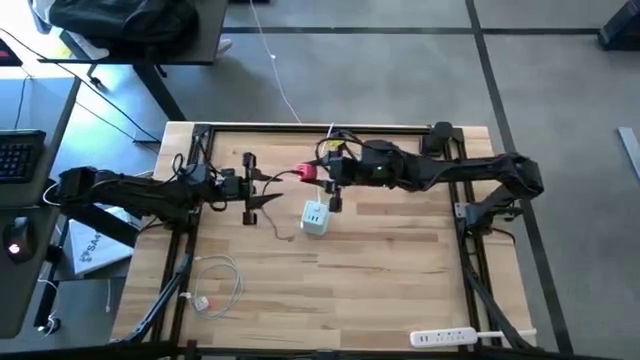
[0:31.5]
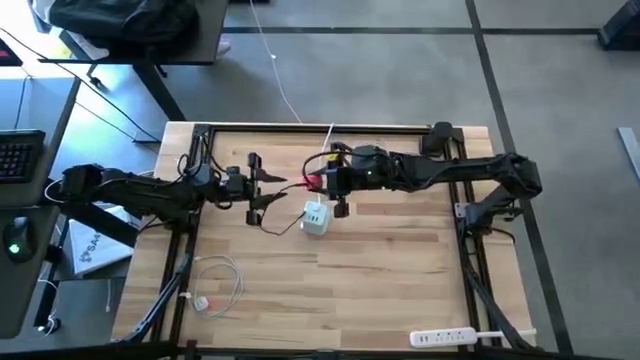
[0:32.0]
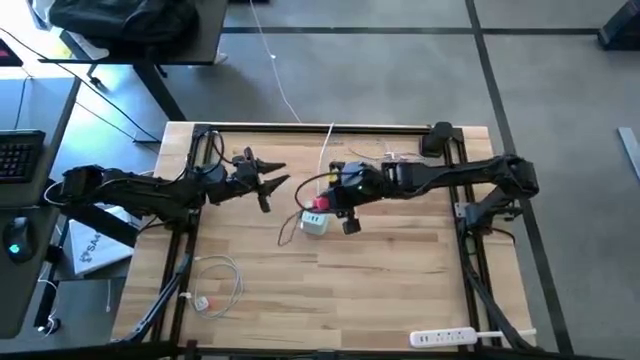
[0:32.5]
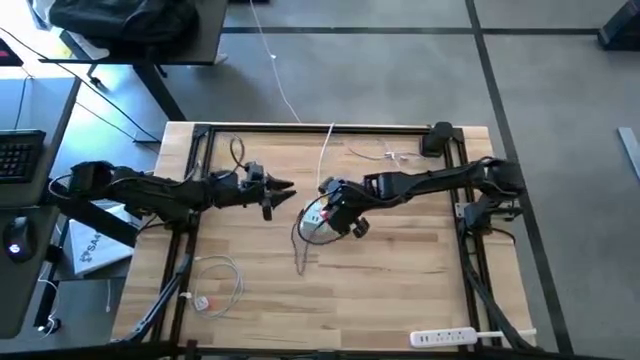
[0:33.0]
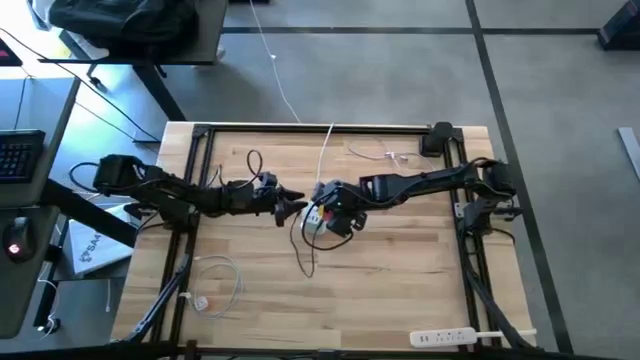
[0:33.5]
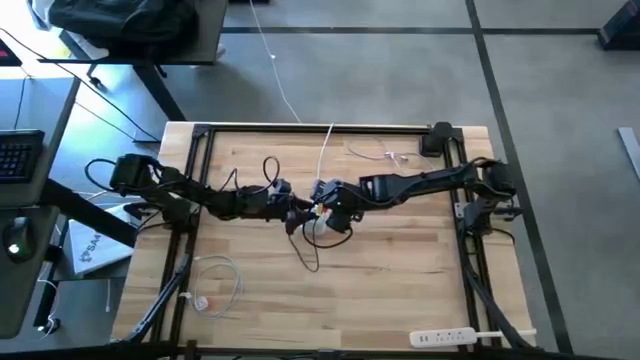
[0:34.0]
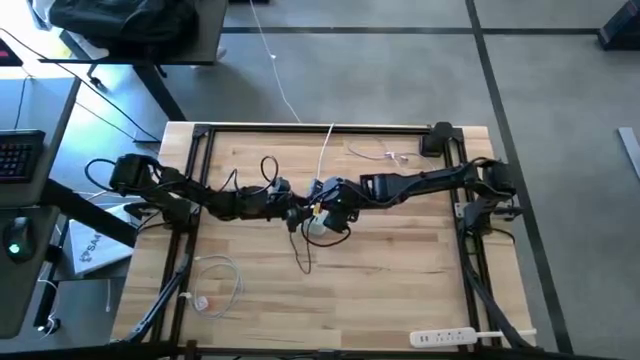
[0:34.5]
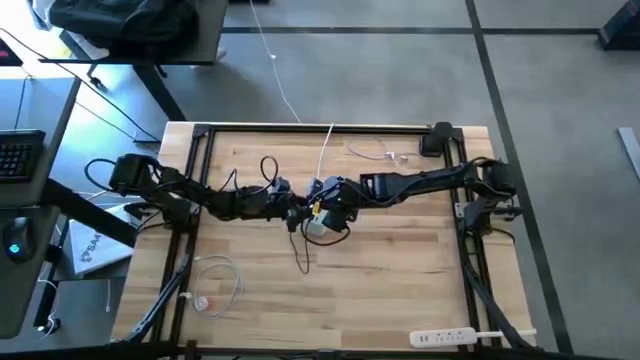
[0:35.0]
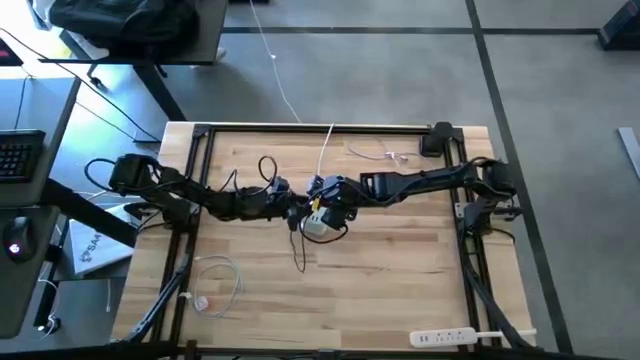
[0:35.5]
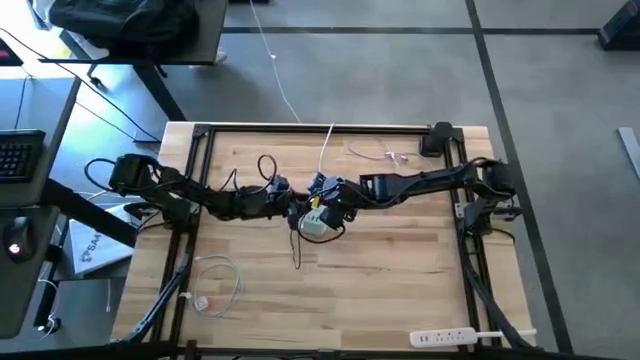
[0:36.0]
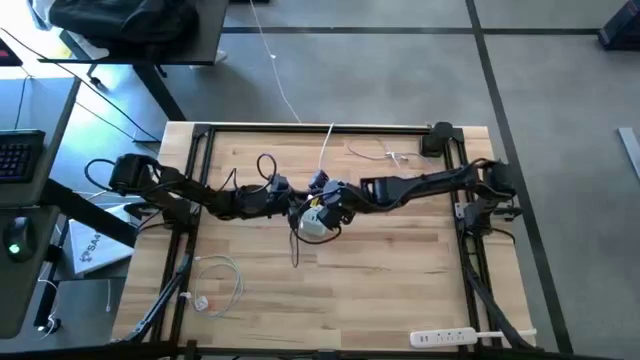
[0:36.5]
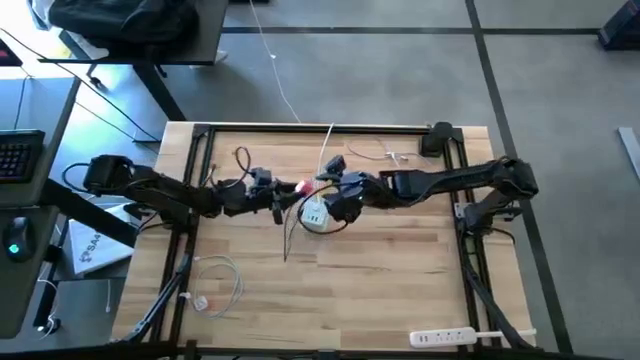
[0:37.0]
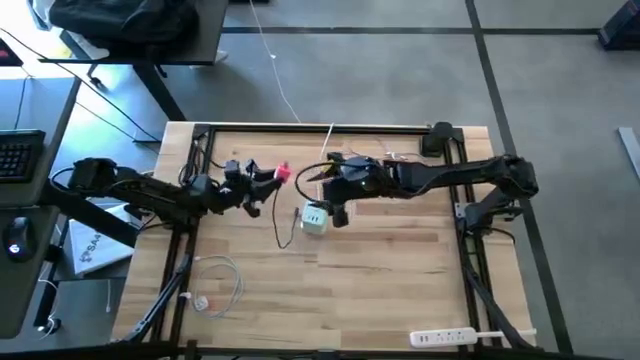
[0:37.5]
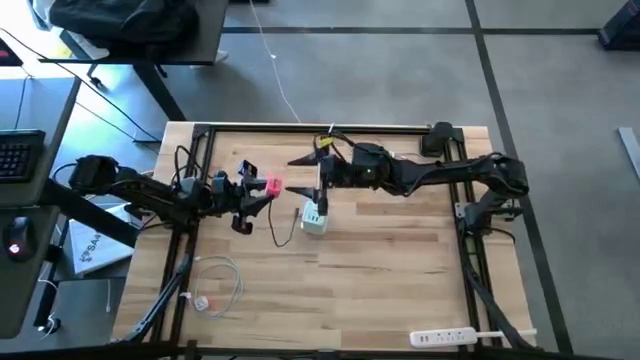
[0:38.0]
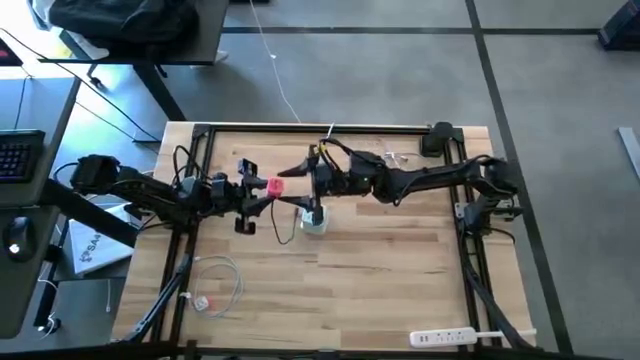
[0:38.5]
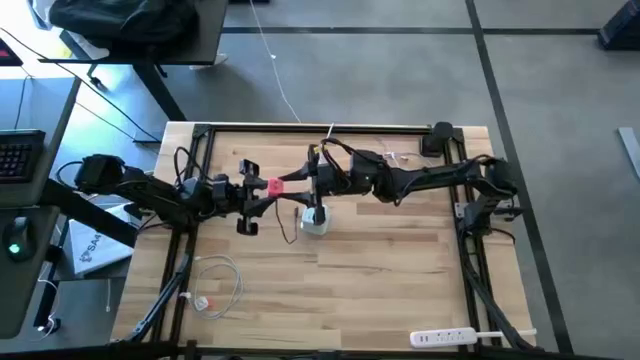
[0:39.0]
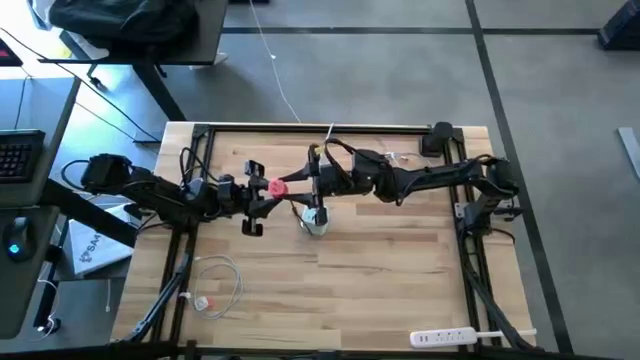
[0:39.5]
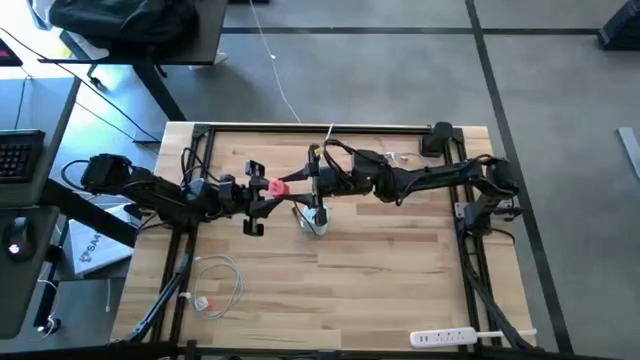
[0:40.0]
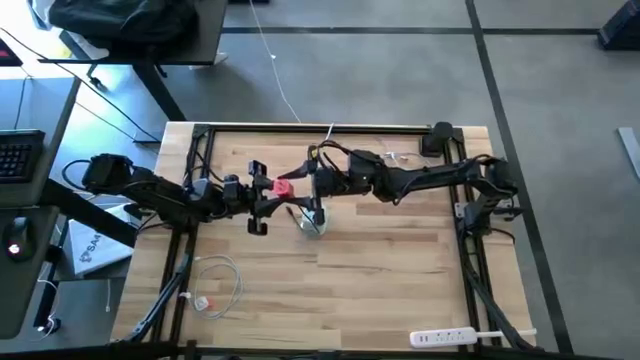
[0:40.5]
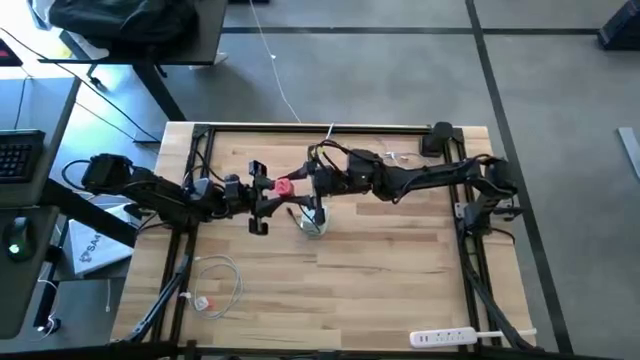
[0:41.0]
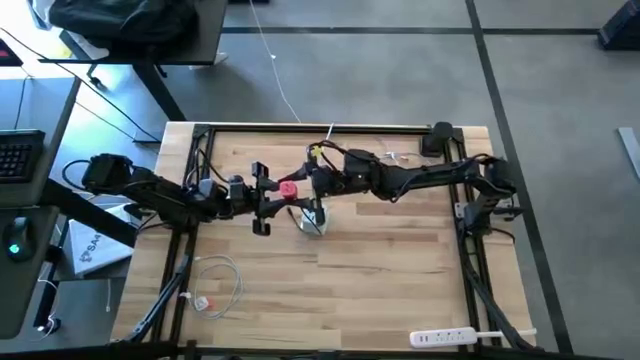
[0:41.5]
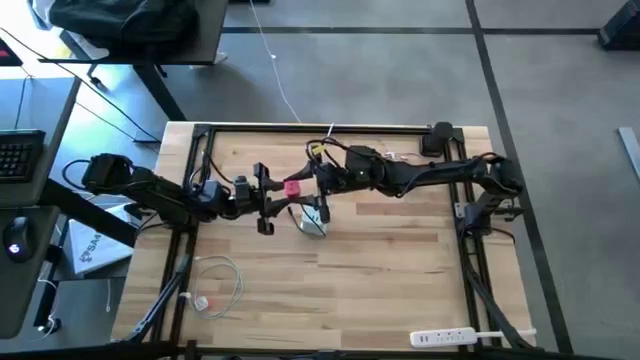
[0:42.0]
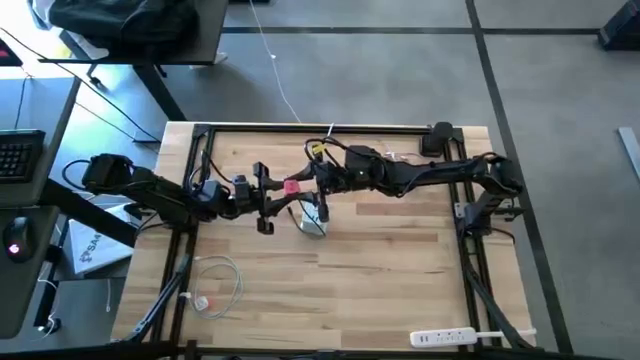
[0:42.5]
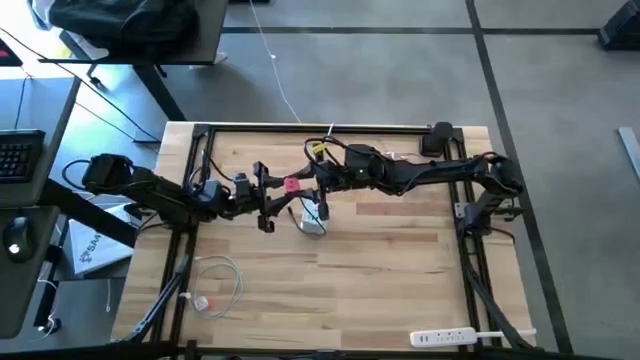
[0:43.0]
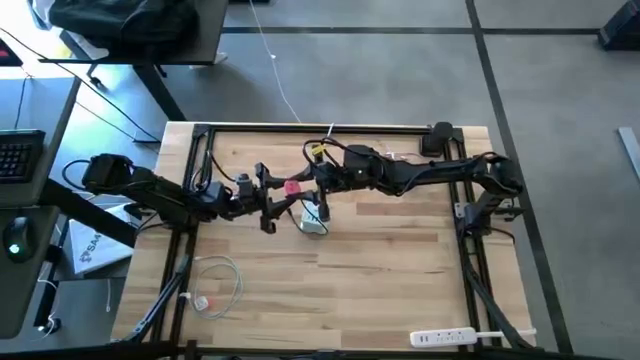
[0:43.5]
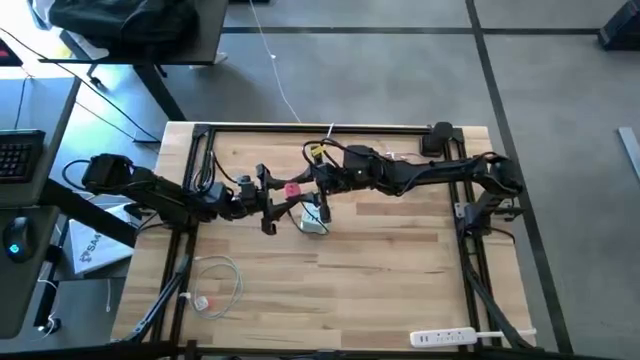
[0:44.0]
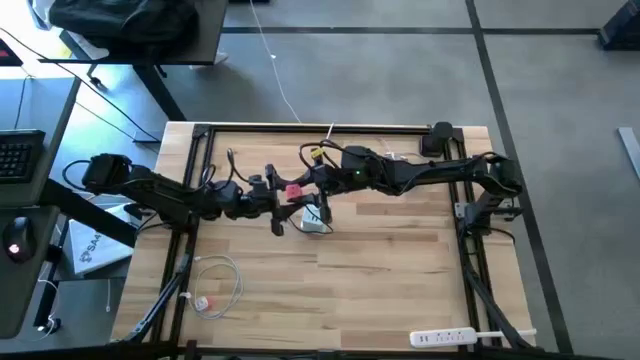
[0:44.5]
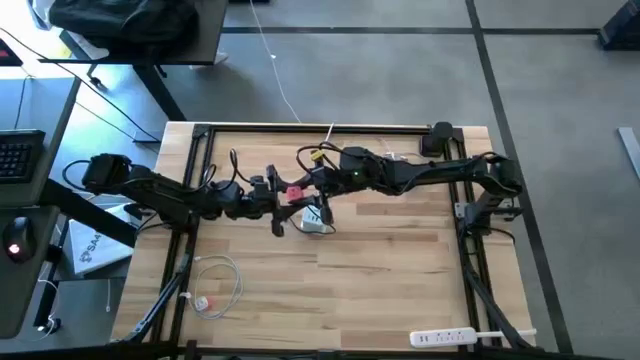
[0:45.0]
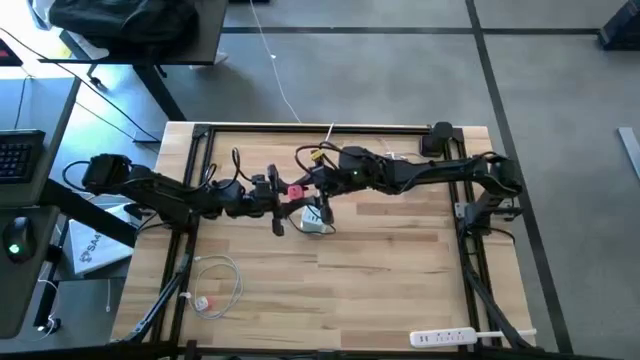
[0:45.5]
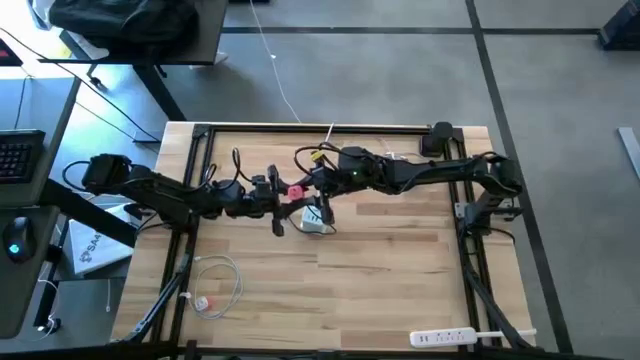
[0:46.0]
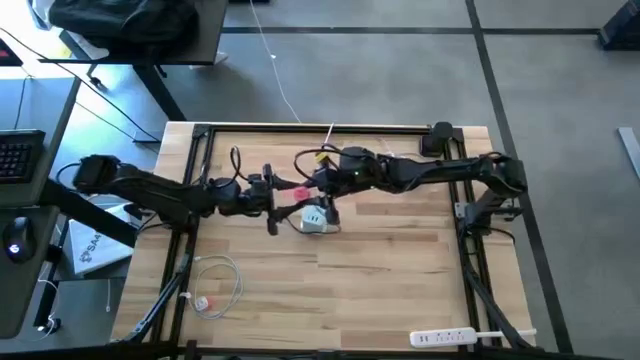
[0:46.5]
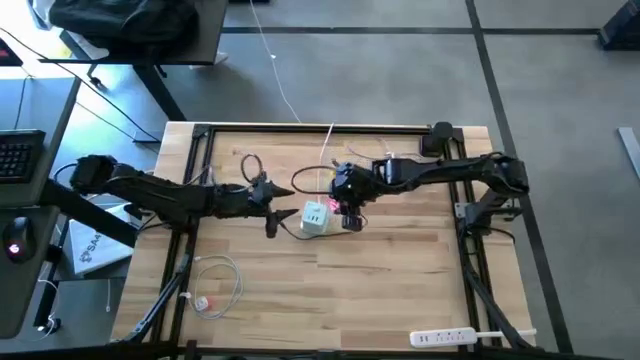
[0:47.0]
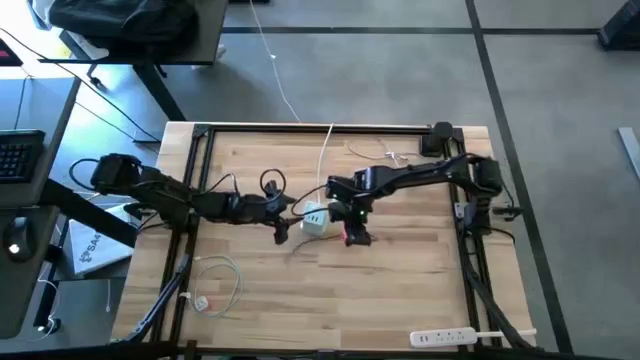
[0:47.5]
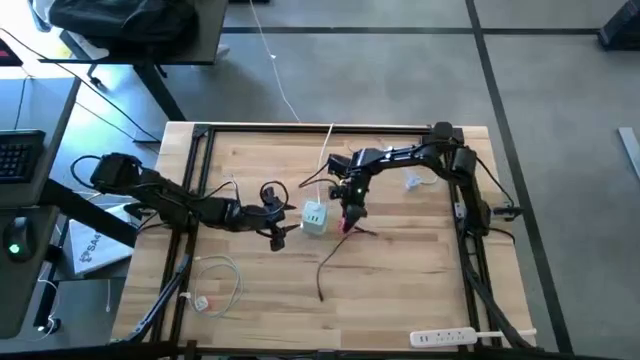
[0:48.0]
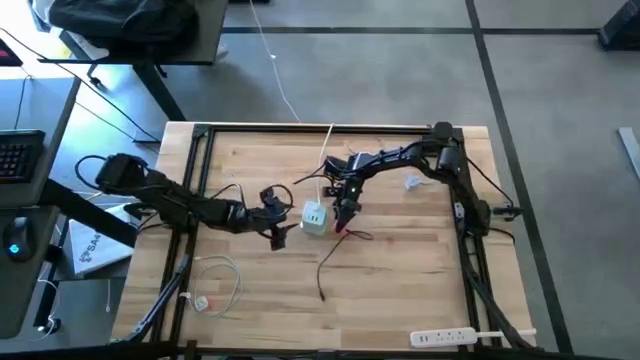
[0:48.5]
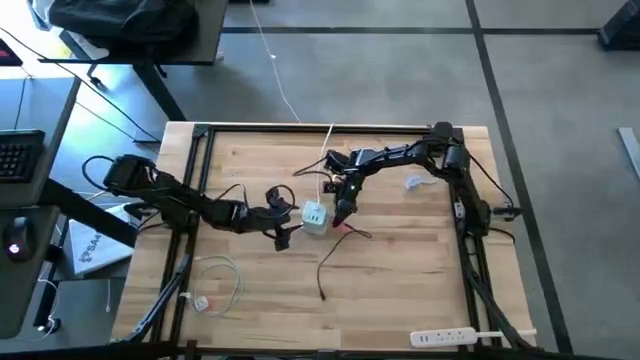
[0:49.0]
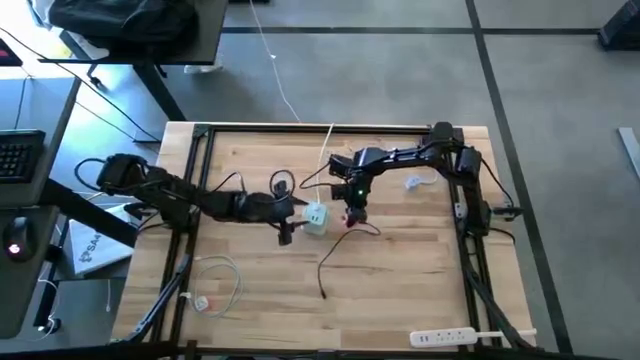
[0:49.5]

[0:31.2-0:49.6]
Task: Insert USB
Insert the pink charger adapter into the top white outlet extension

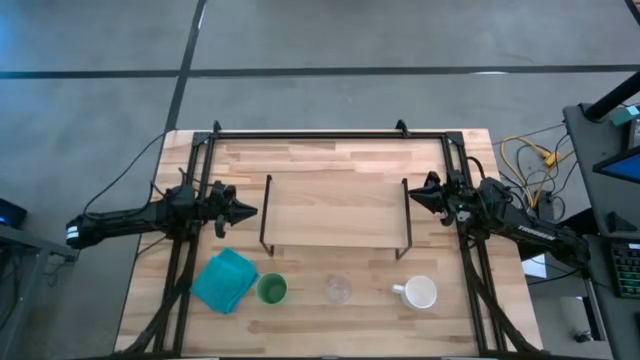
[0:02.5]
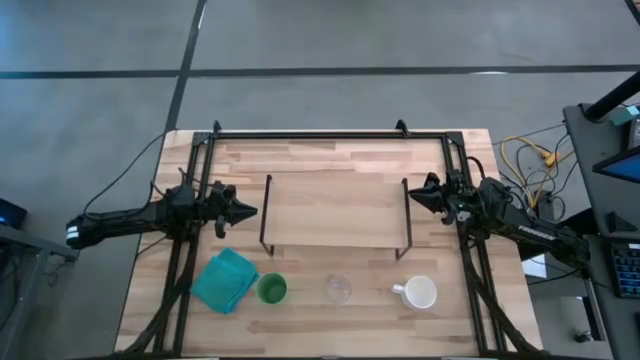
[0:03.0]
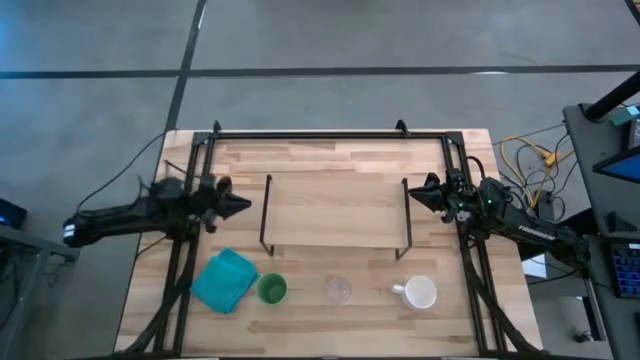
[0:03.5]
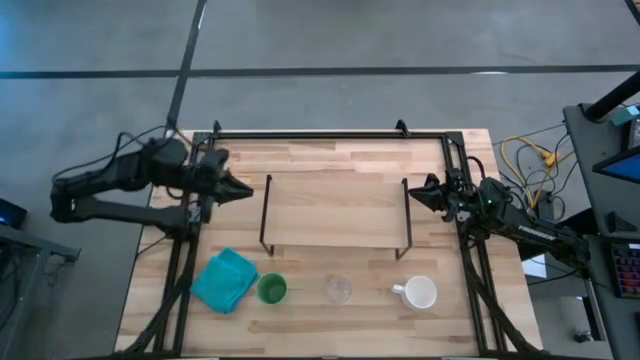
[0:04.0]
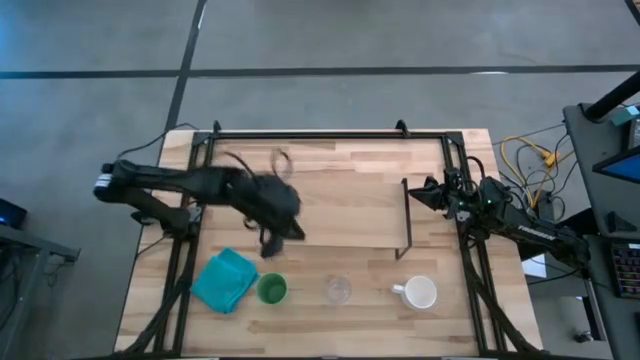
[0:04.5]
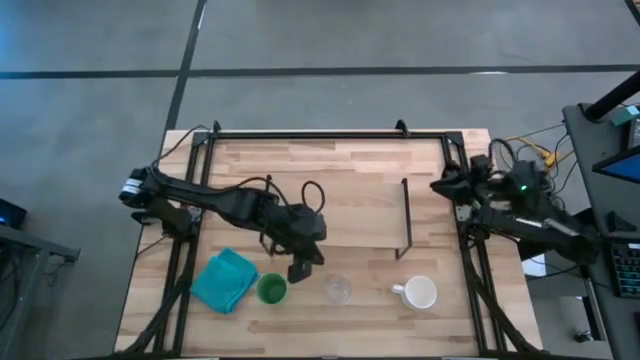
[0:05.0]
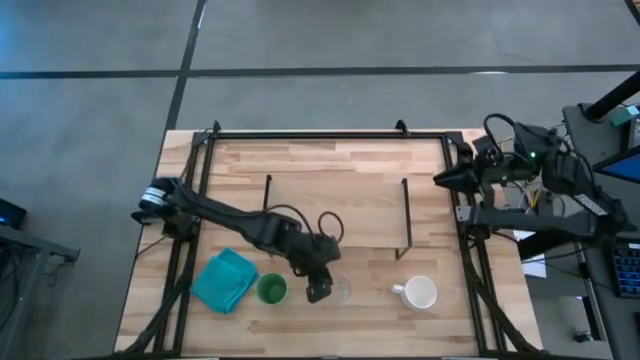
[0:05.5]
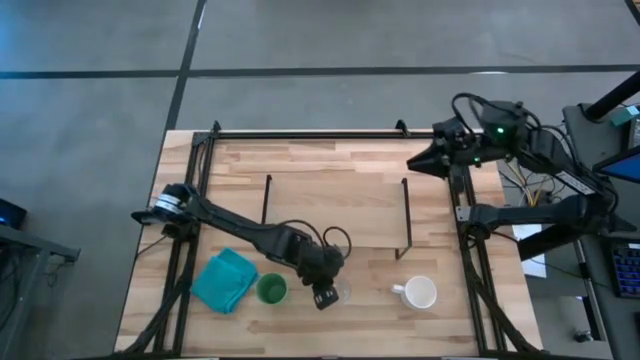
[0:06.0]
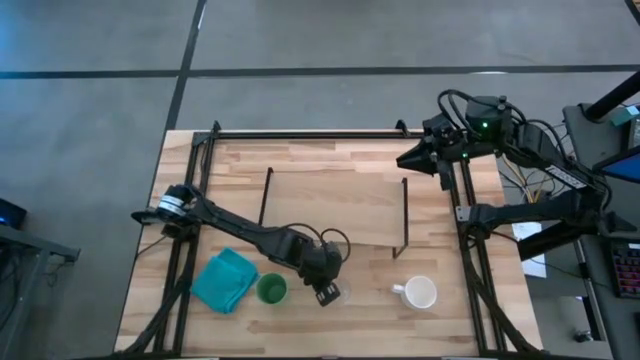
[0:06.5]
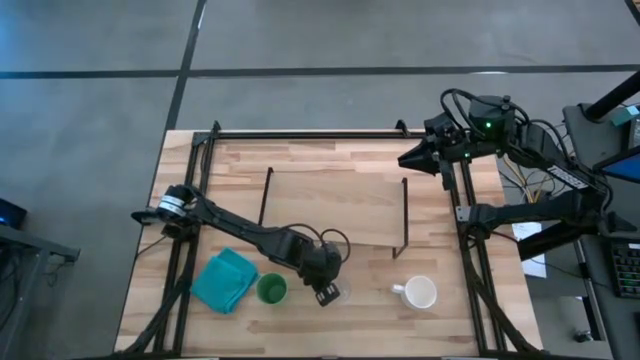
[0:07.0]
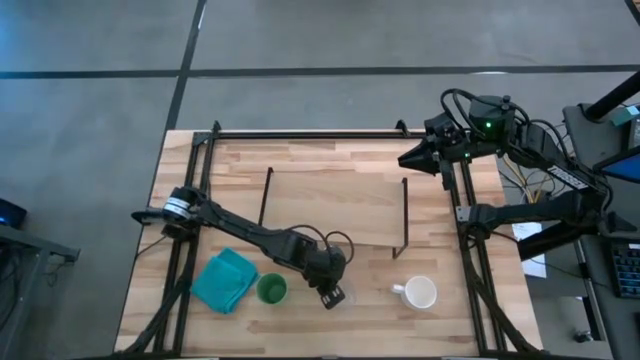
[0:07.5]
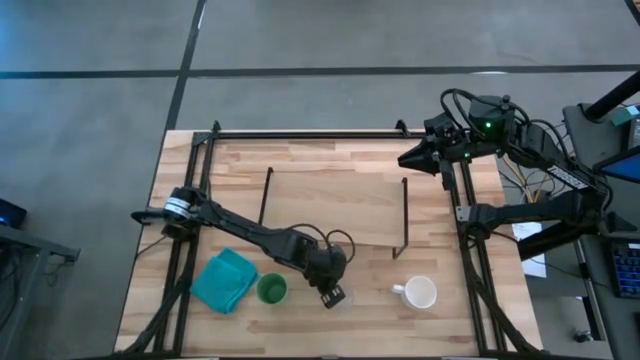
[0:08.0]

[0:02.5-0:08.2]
Task: Stack small to large cups/mugs on shelf
Put the transparent cup on the shelf
